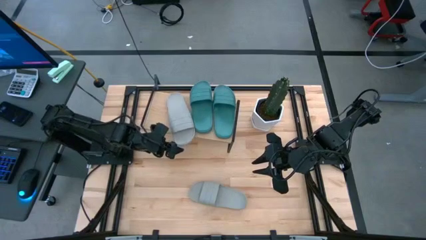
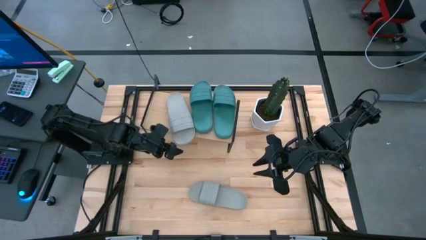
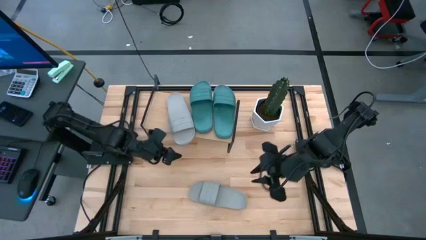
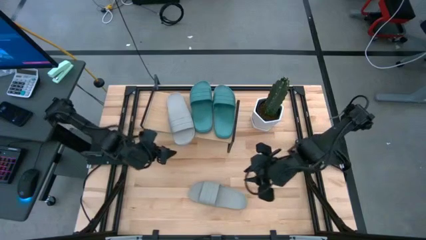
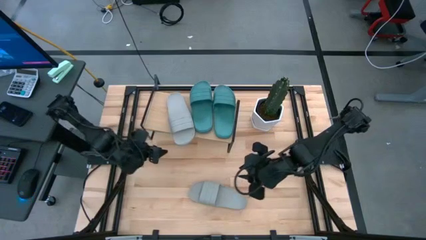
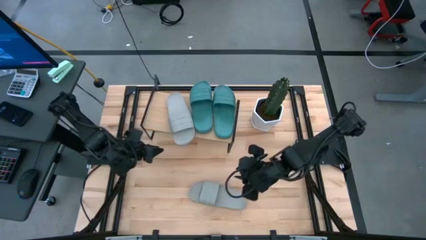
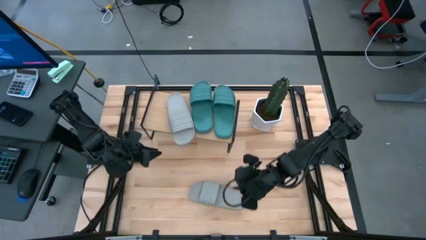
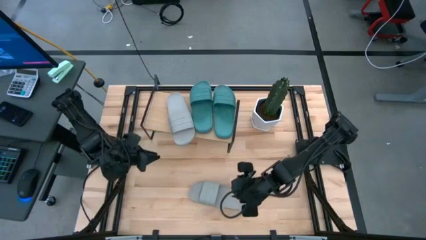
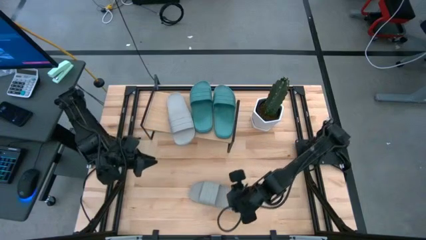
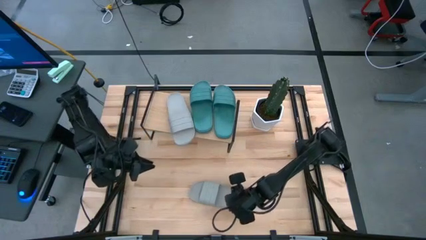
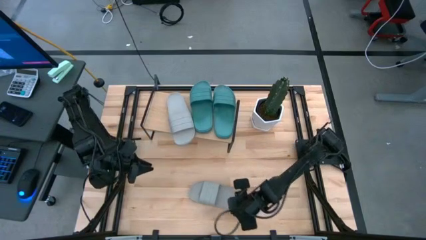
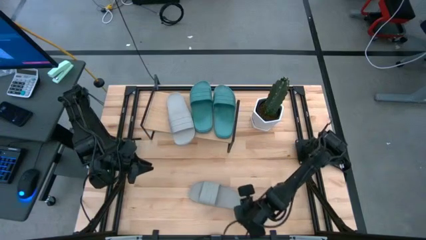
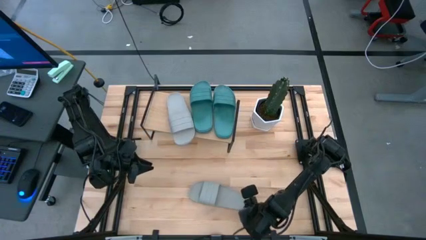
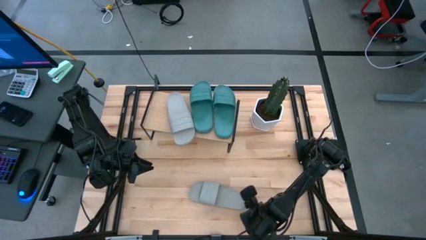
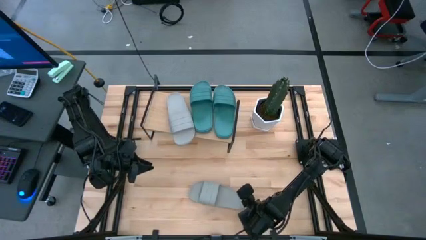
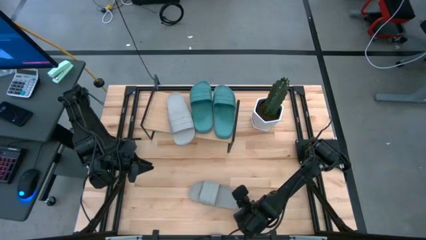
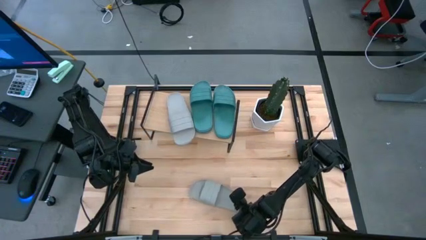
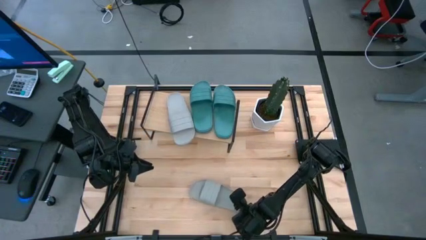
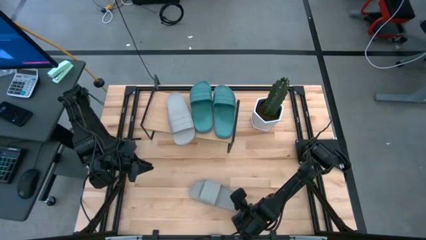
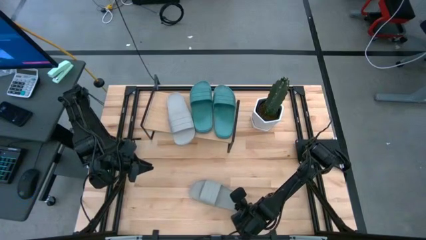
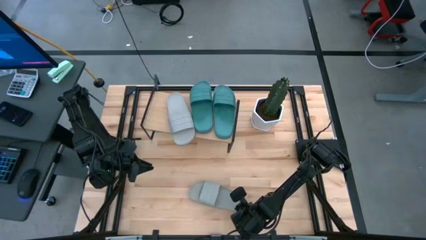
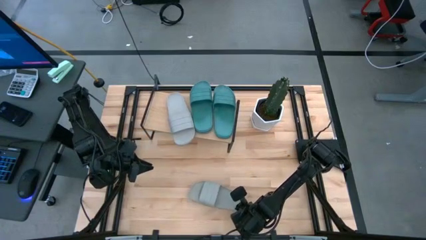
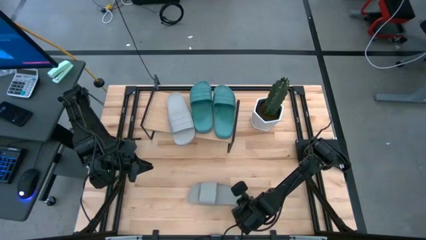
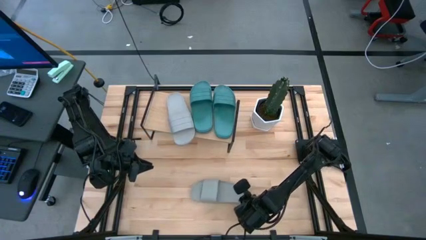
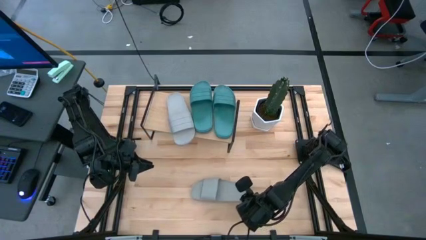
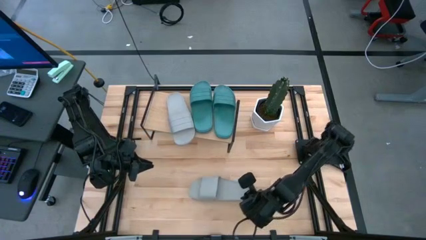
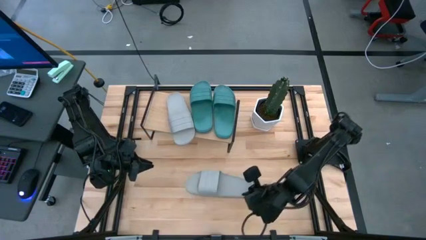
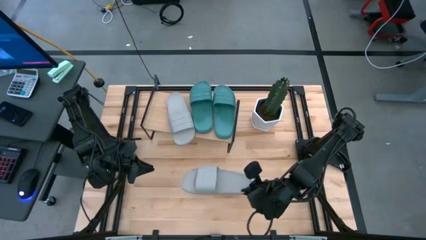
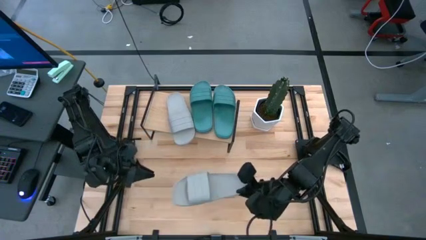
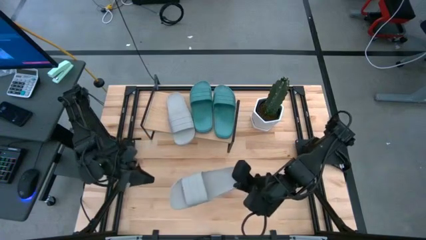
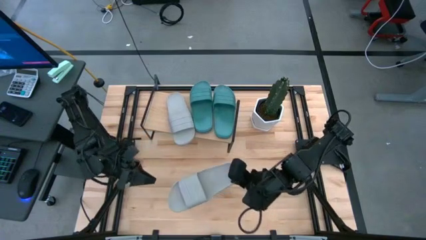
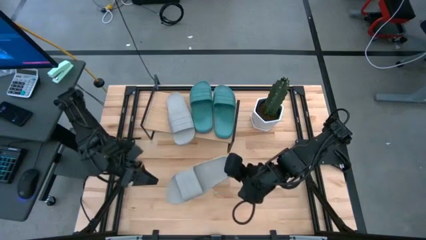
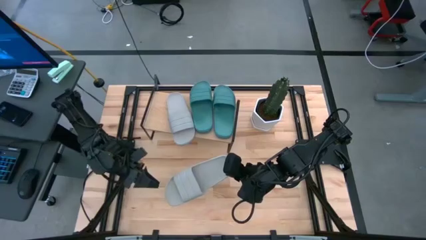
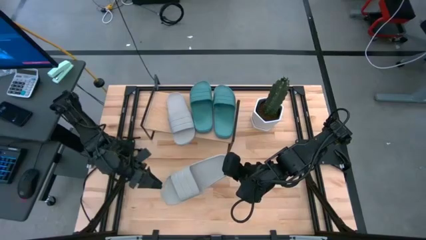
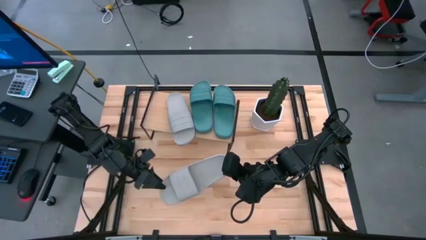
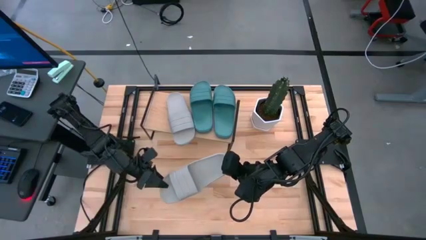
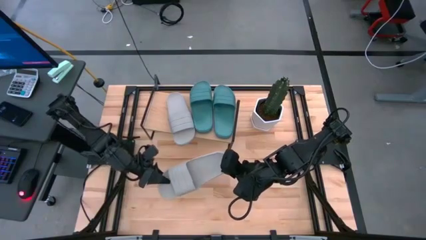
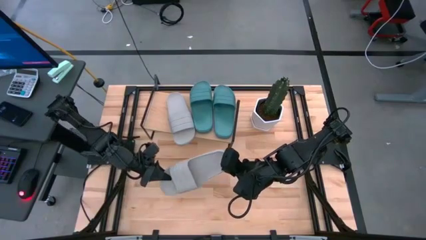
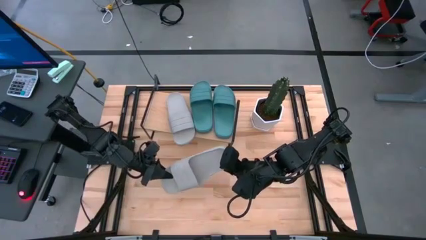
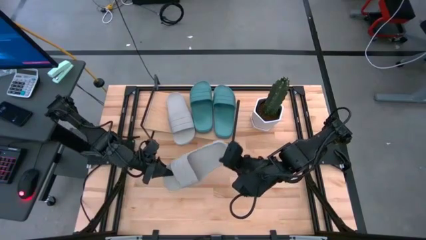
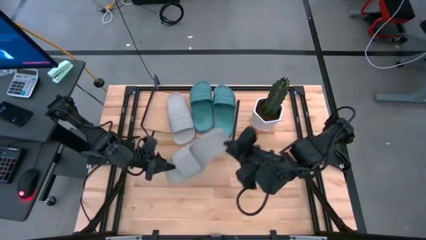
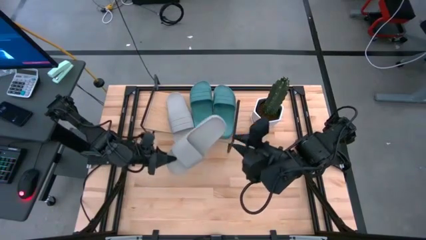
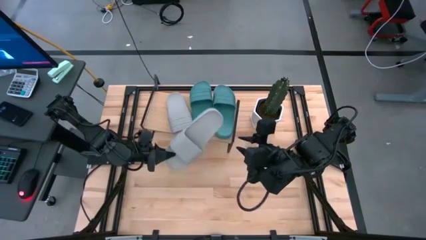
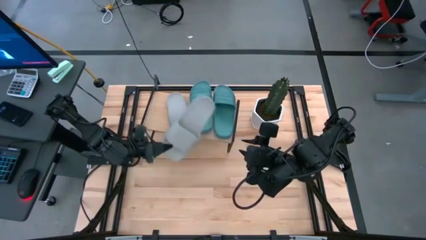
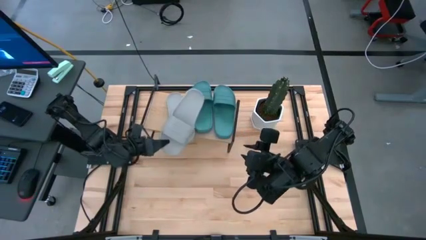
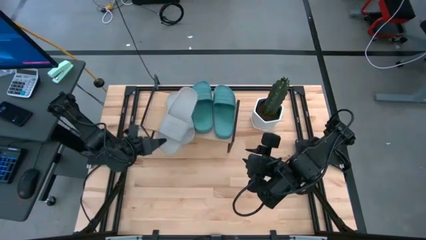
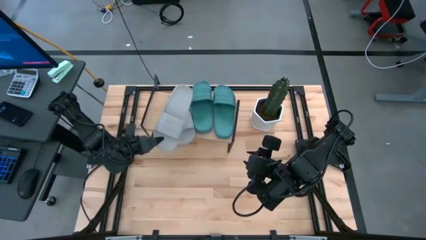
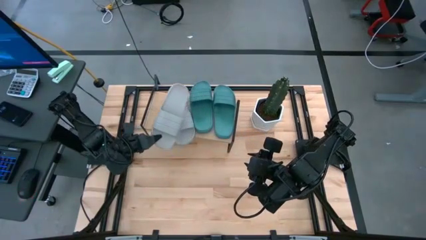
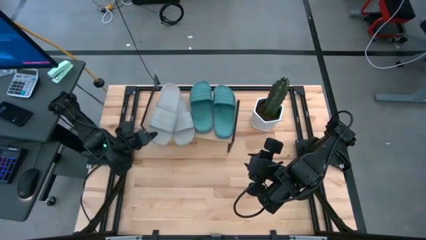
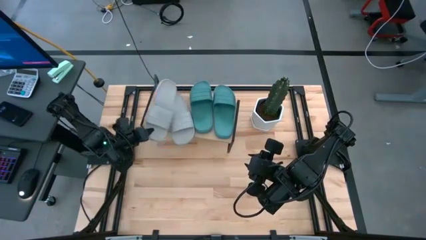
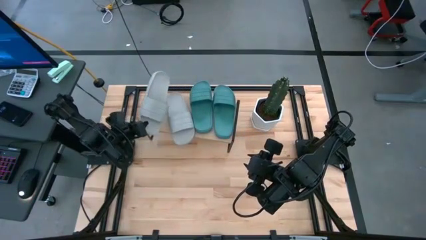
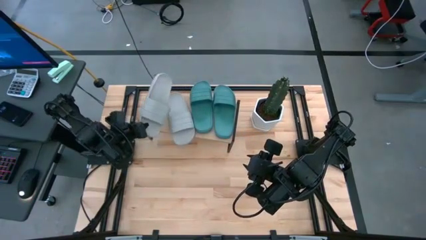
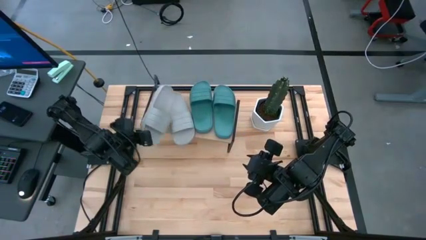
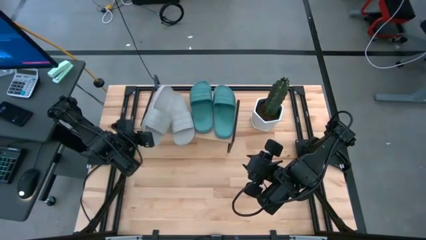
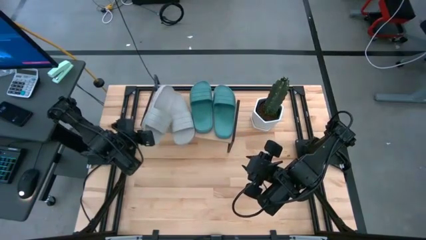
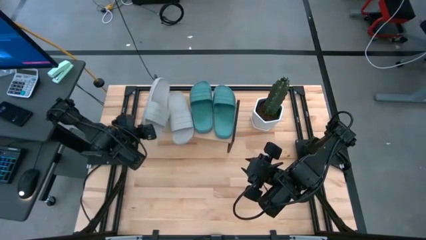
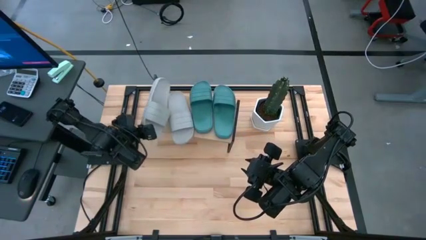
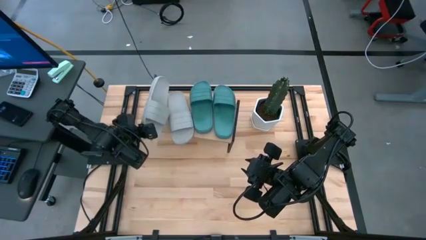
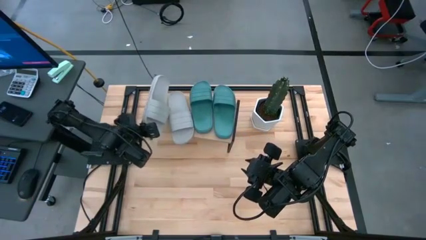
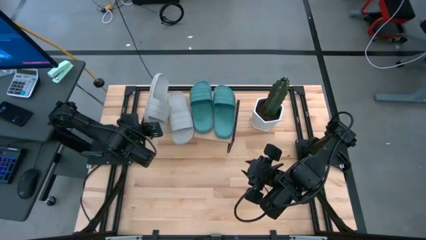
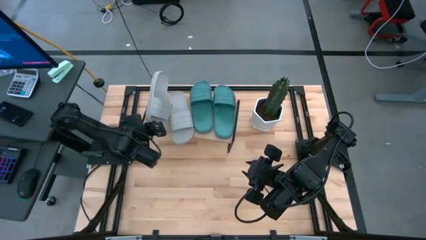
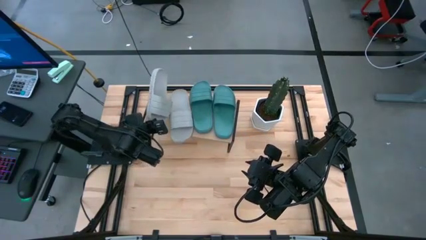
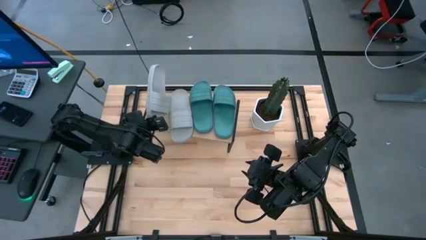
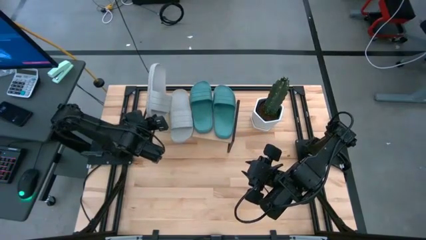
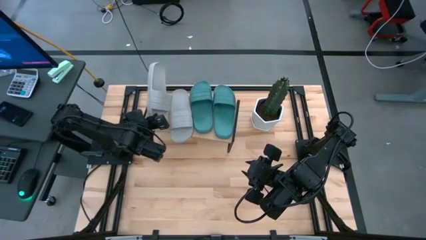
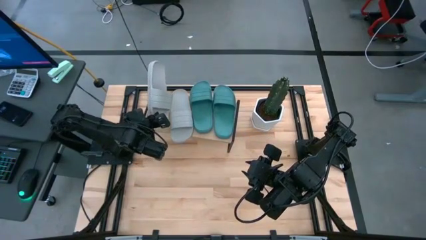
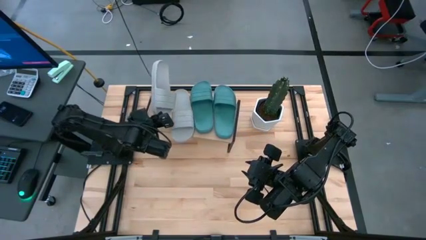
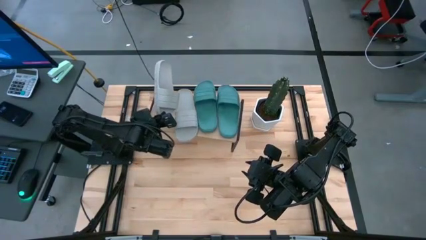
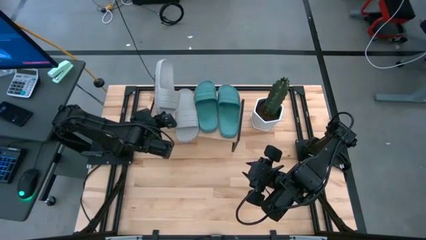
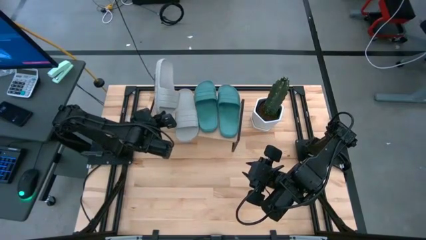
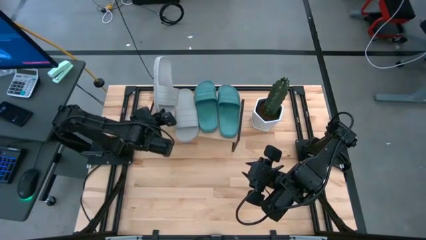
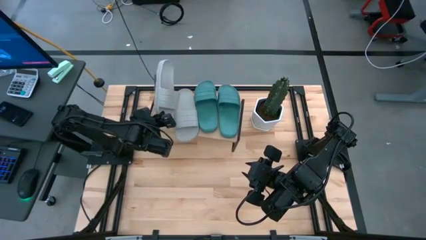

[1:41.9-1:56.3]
Task: Pick and place slides into the shelf
Put the gray slide on the shelf

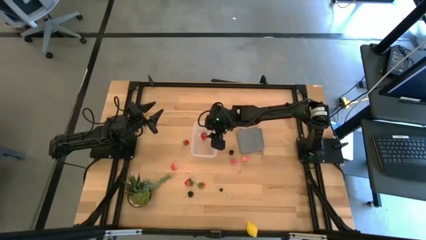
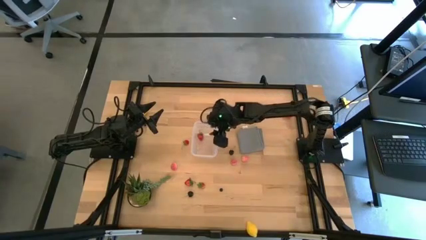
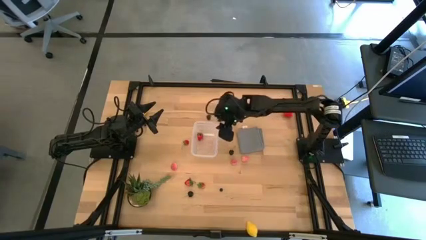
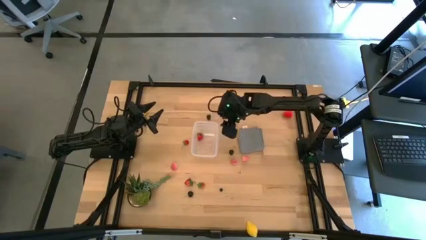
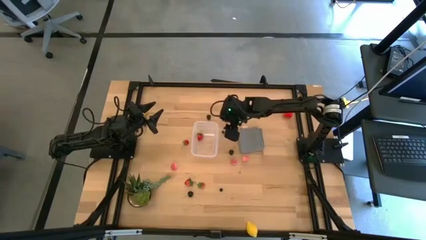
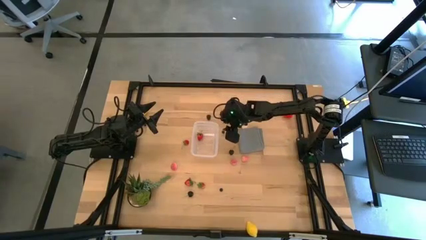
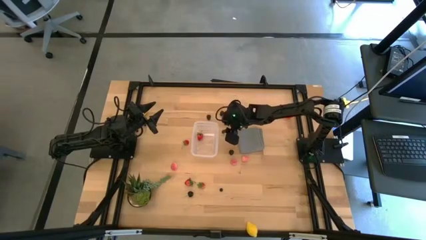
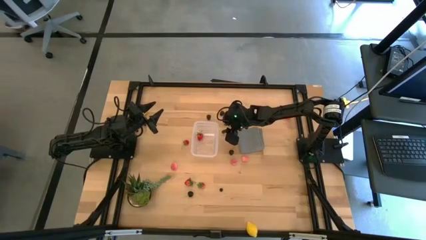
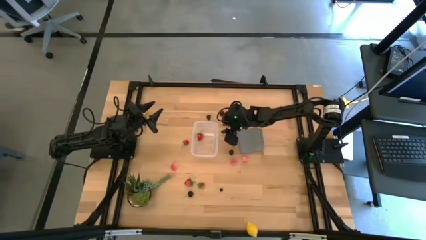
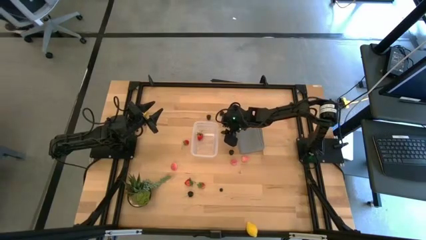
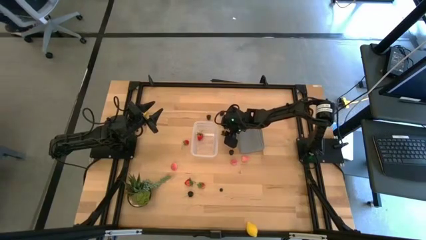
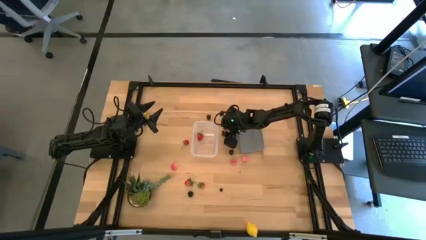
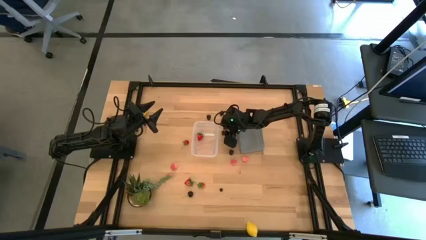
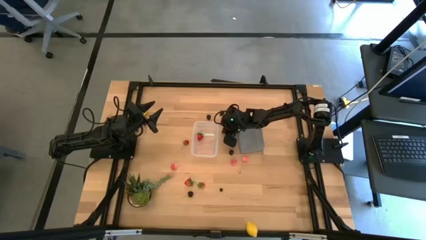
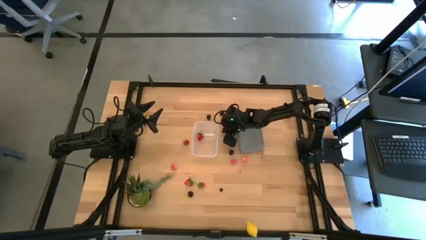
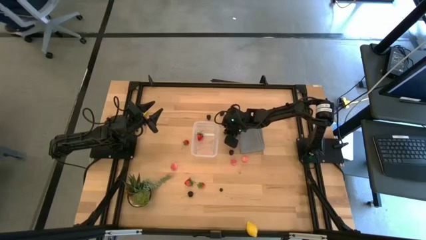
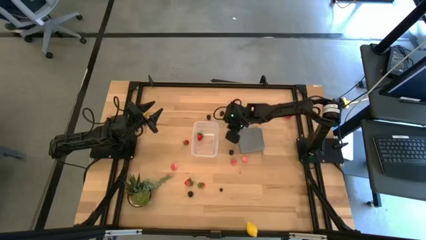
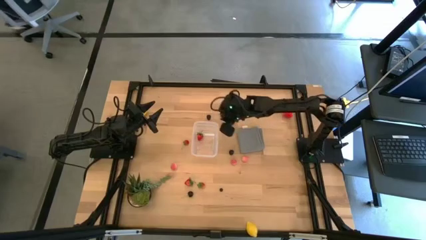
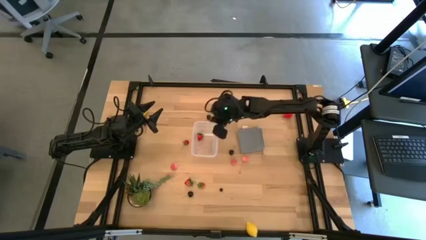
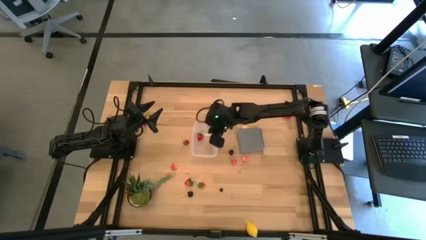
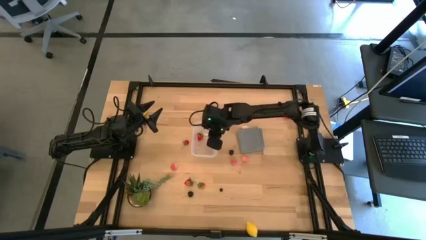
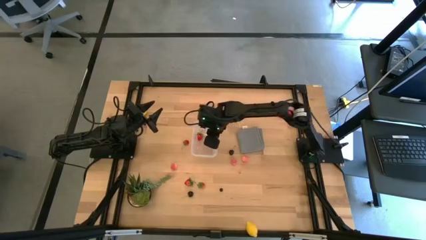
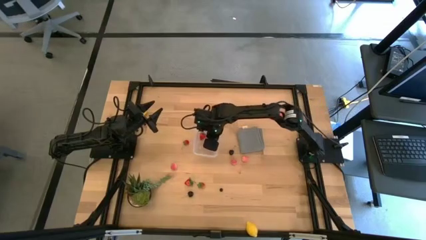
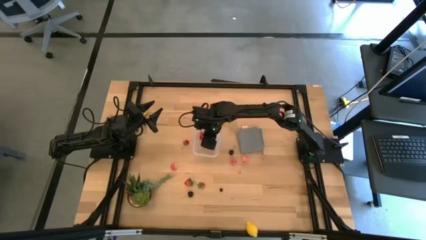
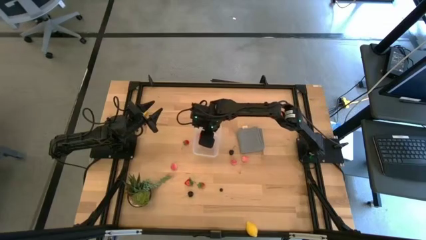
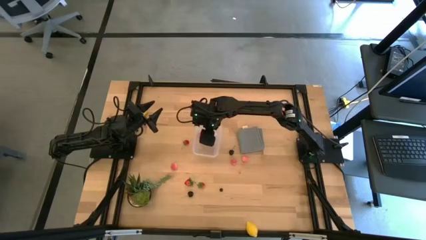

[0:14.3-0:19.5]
Task: Pick and placing Produce into tupperware
Put the blueberry into the transparent bin
